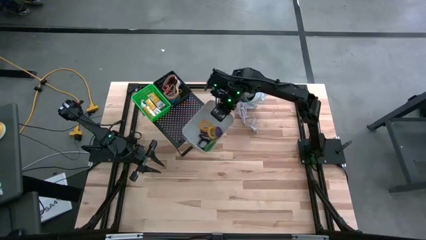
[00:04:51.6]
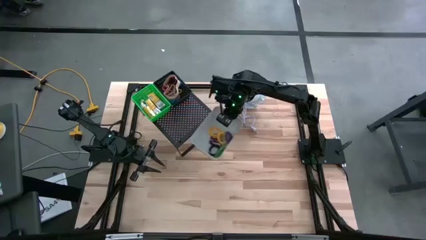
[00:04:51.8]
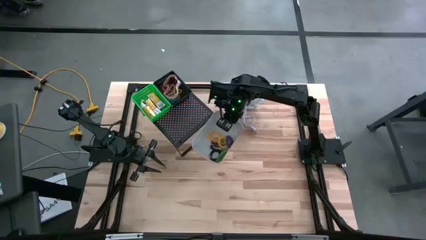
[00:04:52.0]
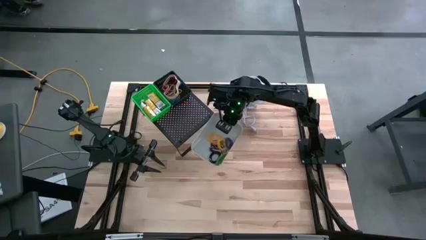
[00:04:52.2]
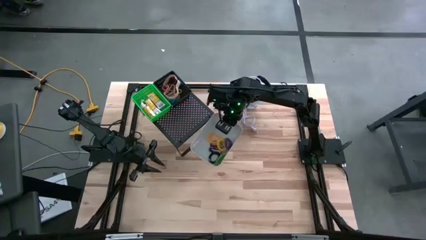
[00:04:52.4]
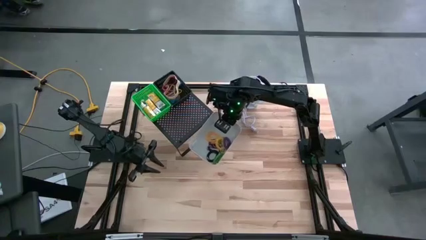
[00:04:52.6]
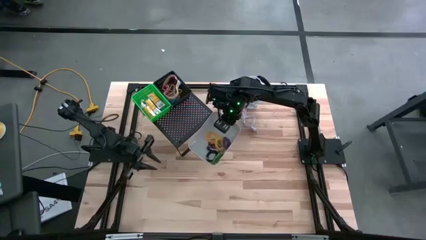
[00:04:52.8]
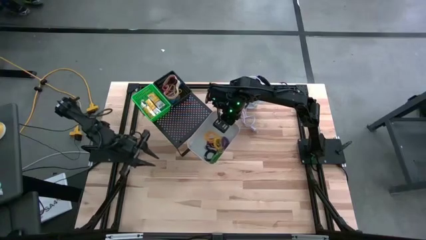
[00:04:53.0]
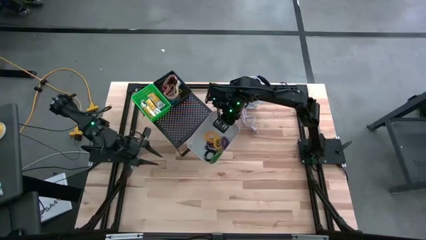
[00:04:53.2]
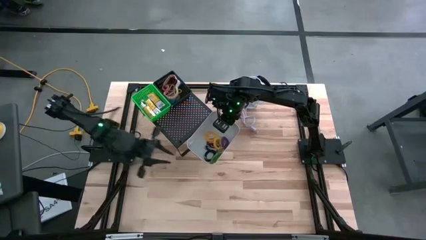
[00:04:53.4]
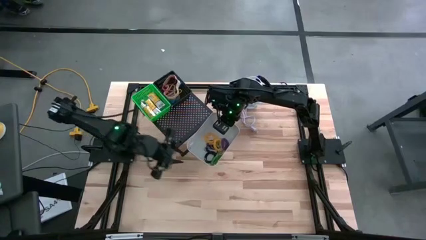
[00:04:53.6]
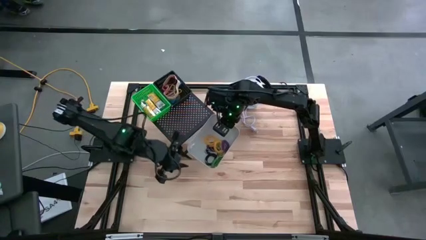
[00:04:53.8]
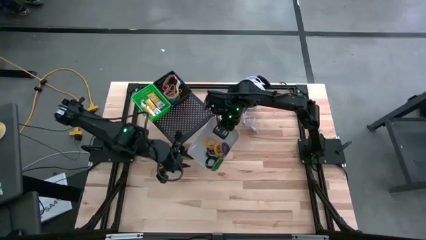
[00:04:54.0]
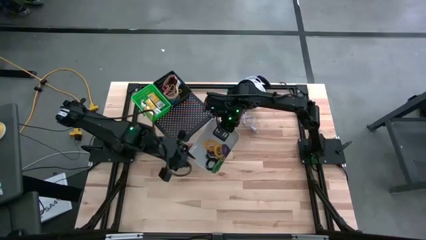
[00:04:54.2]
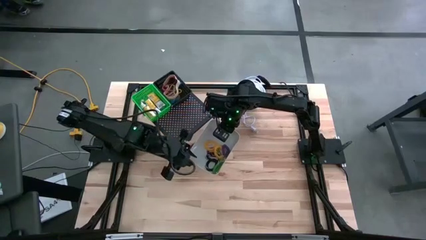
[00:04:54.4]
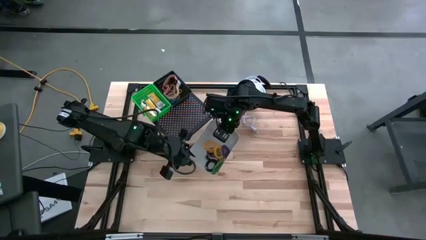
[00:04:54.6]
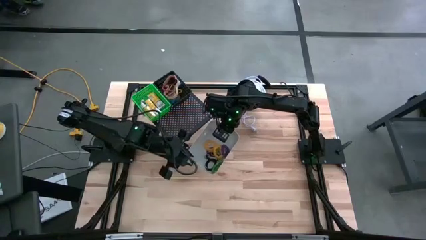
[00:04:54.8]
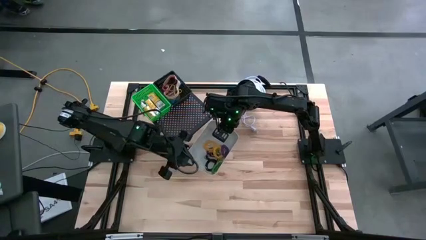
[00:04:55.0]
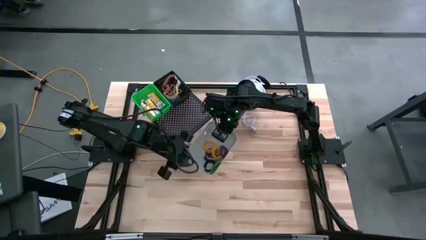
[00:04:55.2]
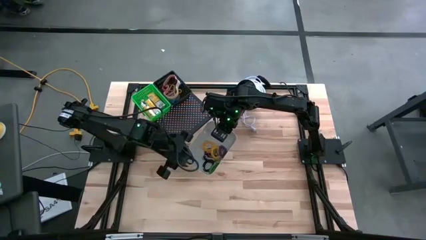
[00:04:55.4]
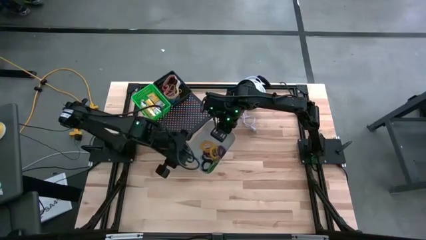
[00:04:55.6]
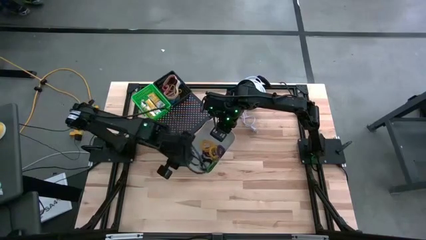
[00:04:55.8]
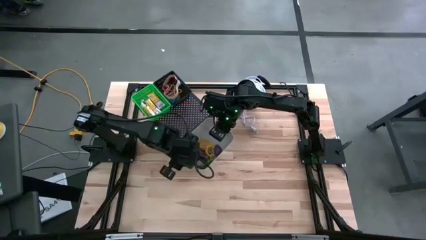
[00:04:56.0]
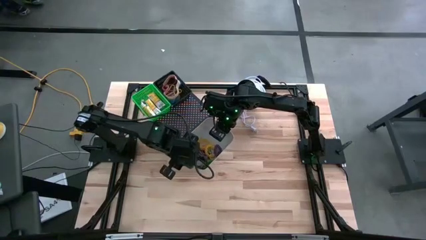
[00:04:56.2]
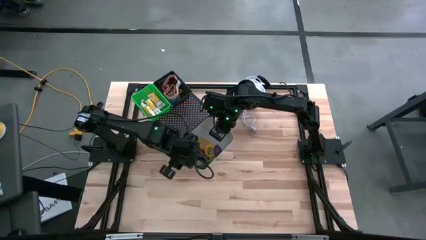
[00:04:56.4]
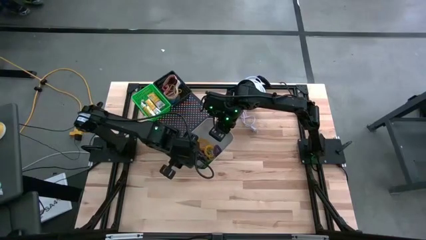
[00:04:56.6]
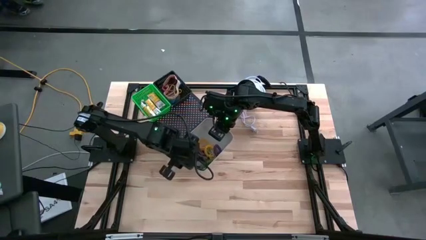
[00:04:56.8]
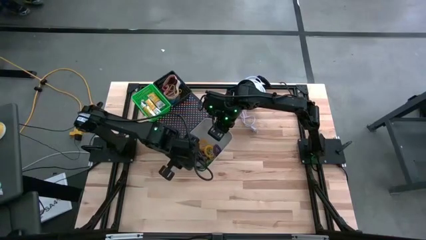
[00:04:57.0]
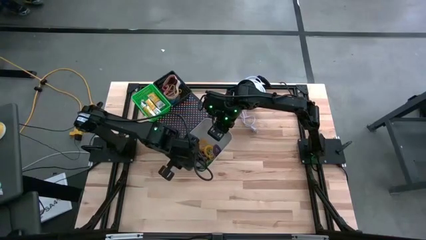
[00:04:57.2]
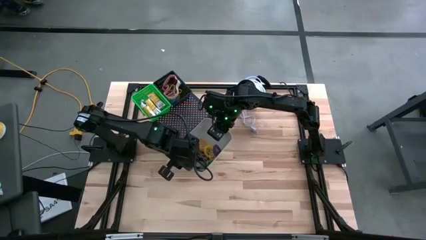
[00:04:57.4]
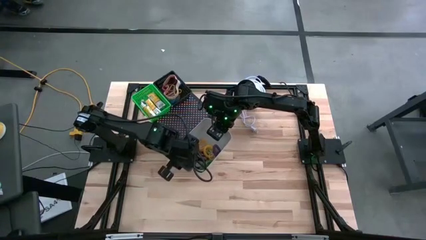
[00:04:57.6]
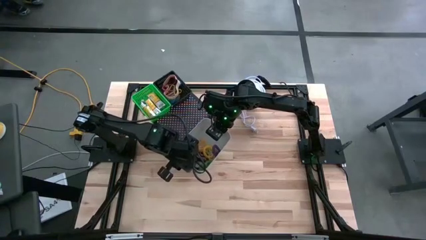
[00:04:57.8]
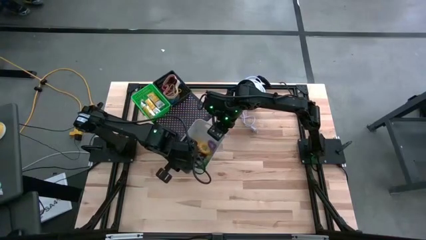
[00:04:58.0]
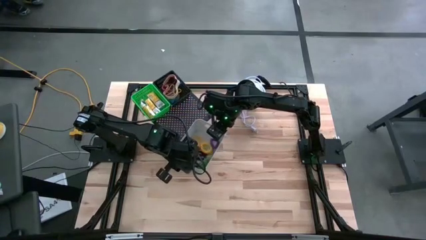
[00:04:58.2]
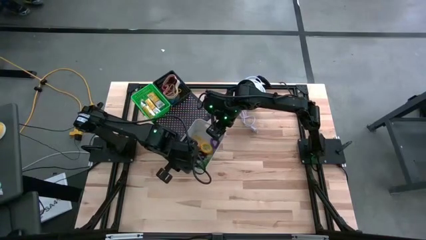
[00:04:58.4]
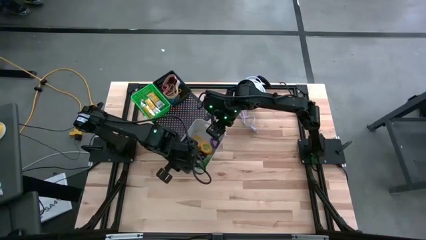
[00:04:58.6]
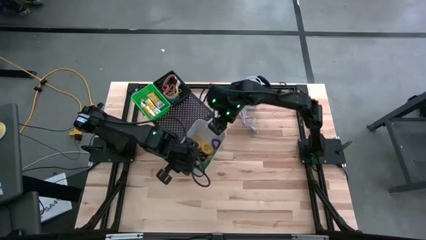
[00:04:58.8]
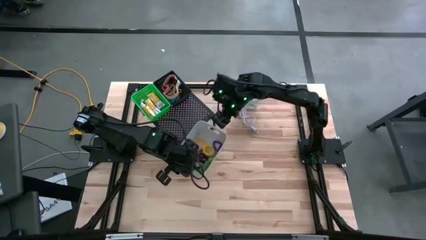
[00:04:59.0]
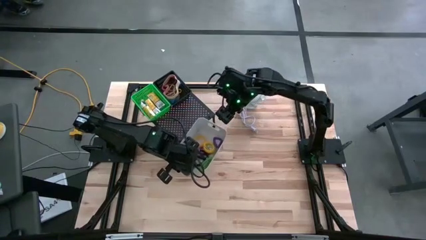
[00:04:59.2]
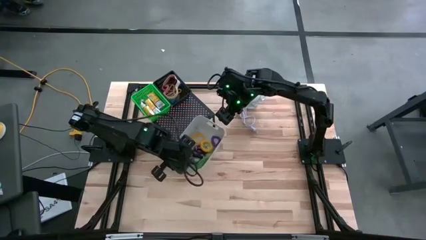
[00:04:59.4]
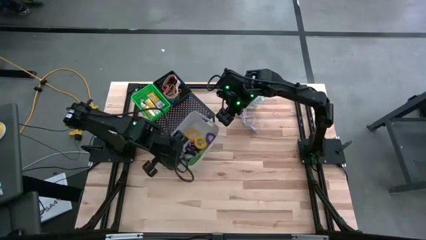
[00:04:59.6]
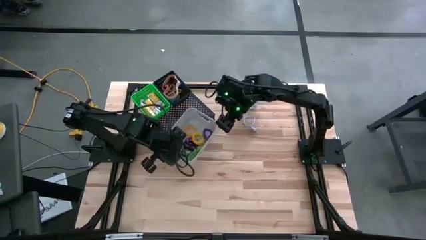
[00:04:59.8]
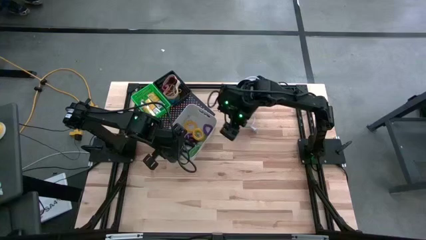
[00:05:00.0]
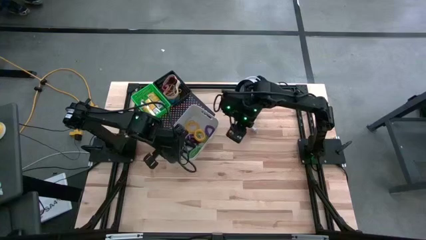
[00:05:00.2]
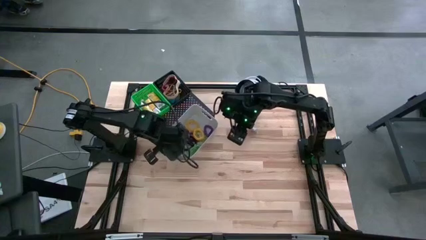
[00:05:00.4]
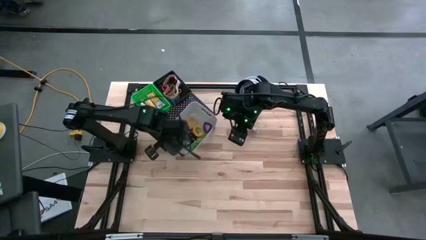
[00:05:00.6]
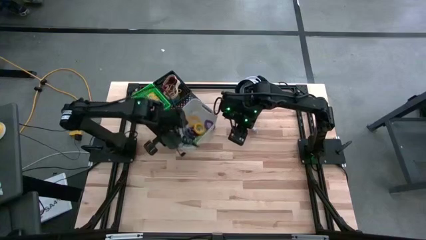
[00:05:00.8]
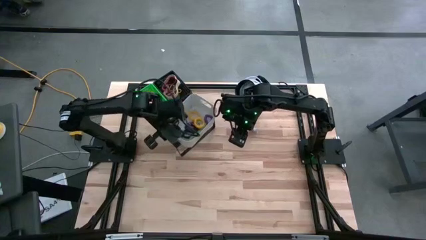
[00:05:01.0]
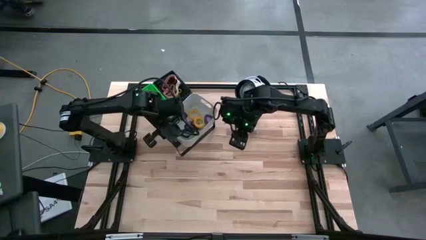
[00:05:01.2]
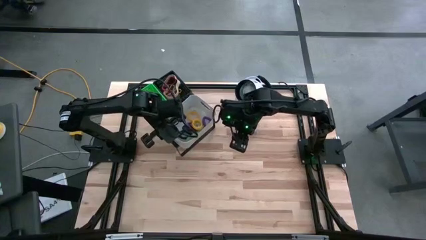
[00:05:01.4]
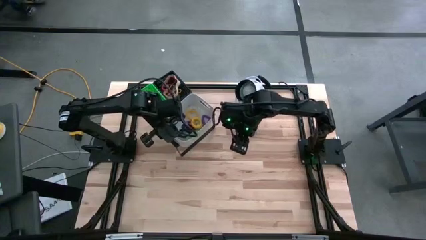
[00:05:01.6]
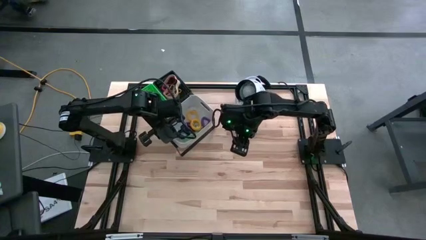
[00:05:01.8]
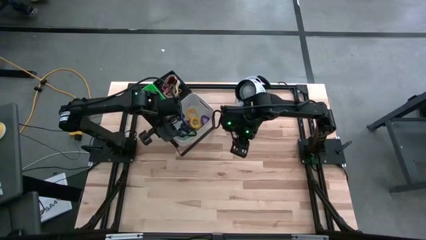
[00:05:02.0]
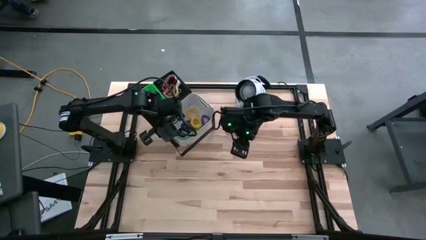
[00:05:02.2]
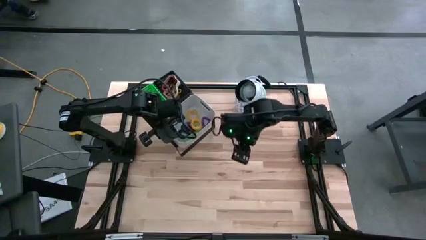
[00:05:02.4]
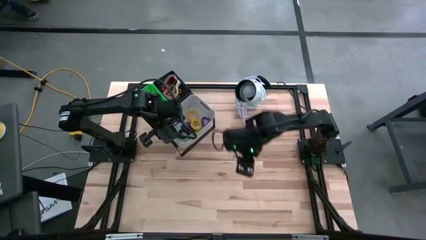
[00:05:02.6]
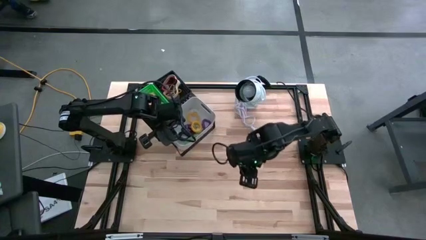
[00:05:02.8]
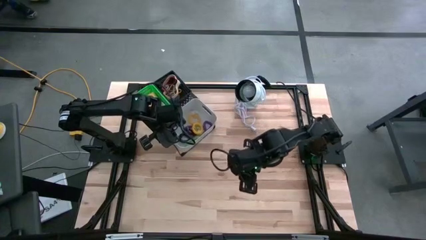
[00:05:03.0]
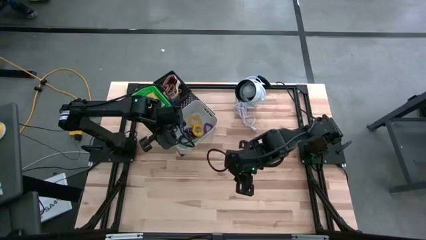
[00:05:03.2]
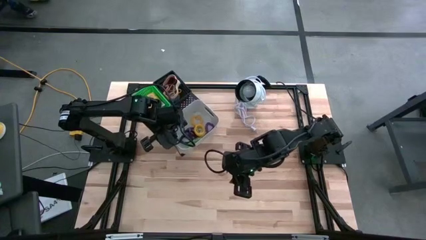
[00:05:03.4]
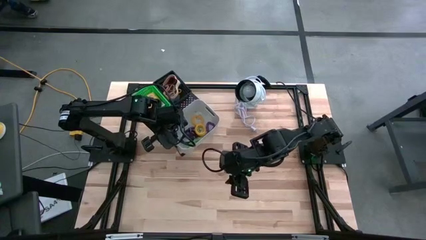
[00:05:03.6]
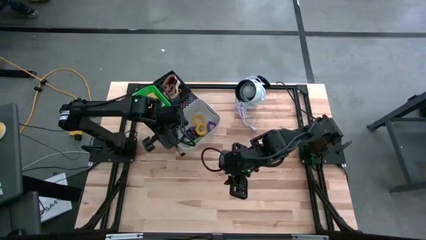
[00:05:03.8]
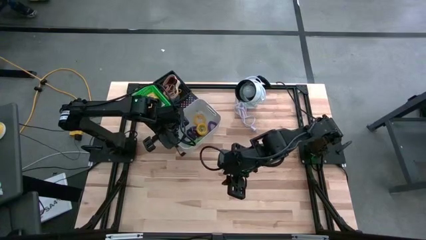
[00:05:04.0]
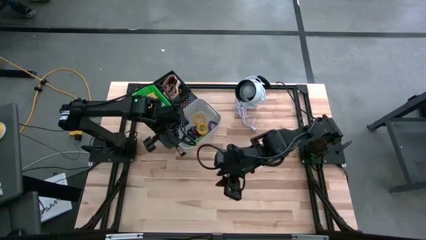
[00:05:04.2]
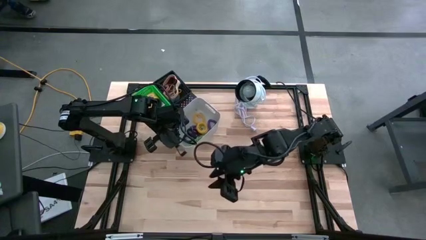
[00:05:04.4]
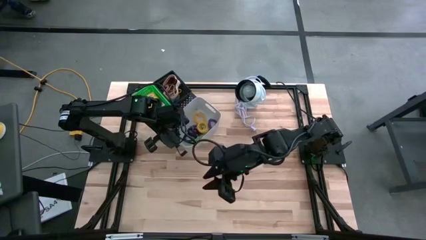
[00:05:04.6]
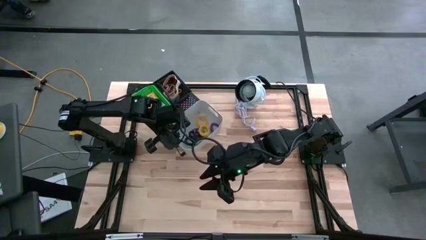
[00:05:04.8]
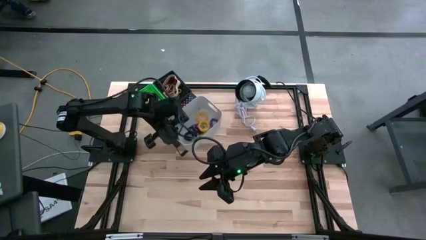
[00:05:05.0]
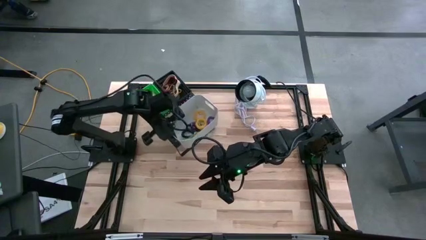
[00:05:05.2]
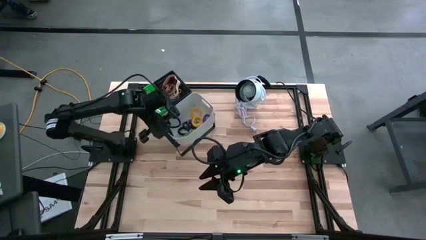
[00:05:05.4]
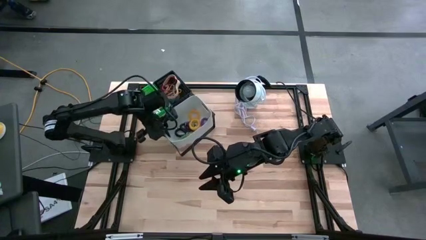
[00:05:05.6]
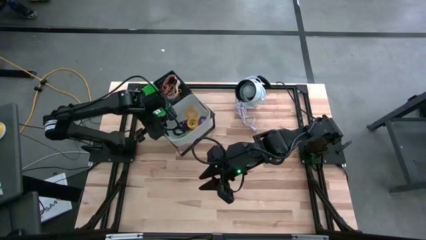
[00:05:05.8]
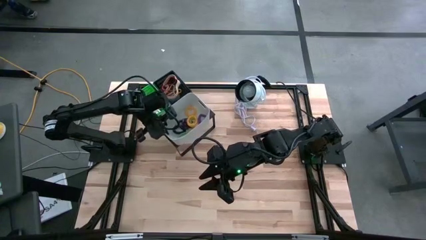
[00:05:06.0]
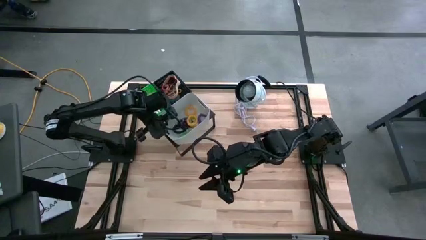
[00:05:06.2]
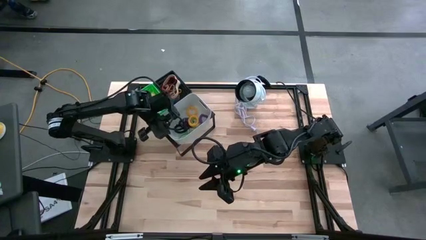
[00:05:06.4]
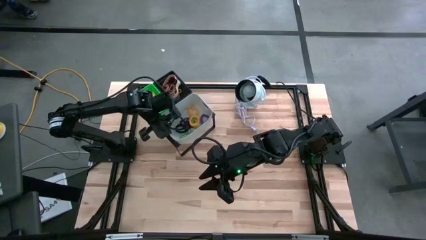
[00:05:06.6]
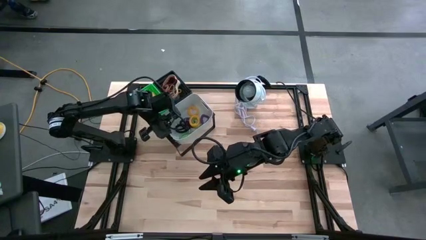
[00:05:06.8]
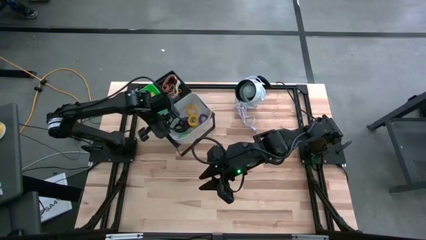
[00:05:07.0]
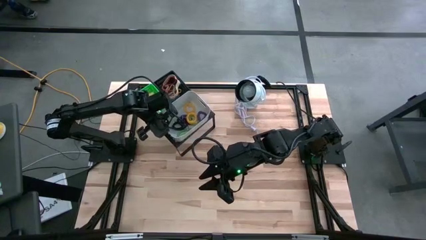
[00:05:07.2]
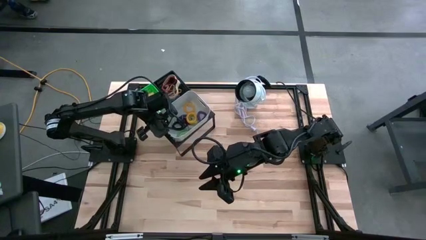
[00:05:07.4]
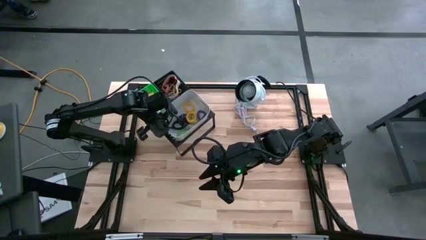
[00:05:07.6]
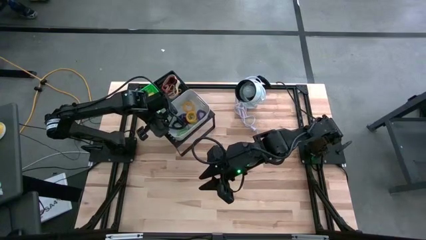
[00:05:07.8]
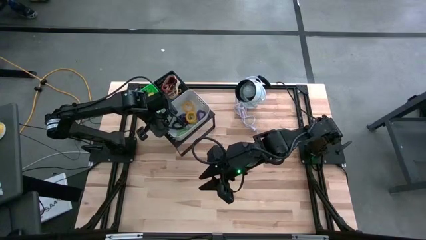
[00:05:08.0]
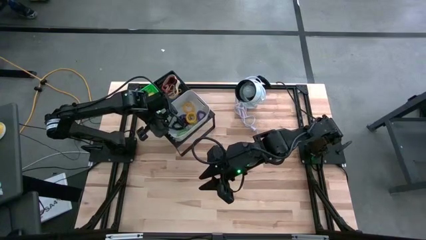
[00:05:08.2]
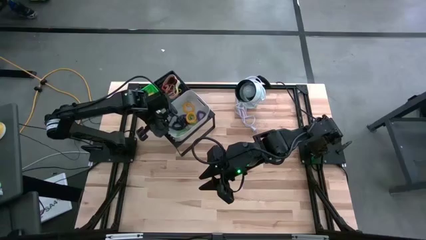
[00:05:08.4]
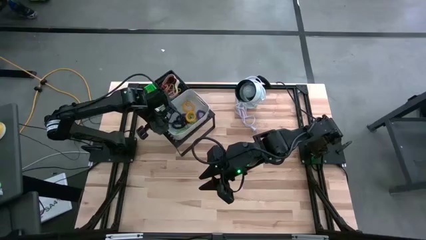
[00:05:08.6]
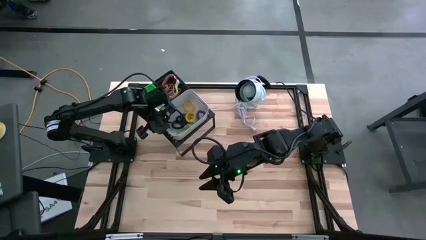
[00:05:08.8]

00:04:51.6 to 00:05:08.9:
Task: Pick & Place Office Desk Supplies
Put the white bin on the shelf
